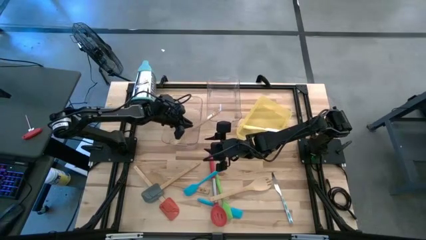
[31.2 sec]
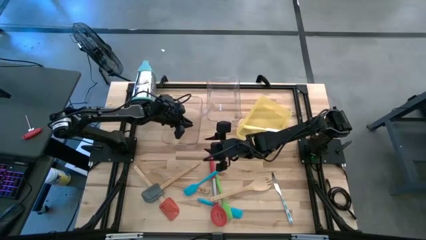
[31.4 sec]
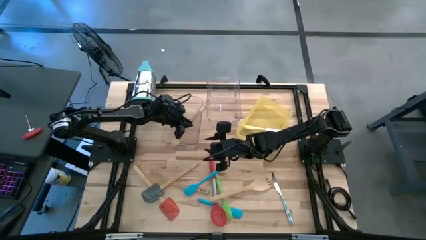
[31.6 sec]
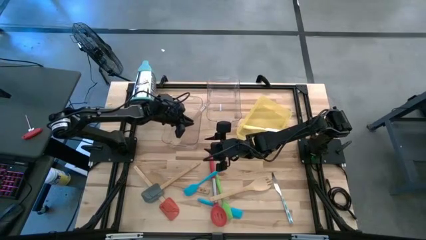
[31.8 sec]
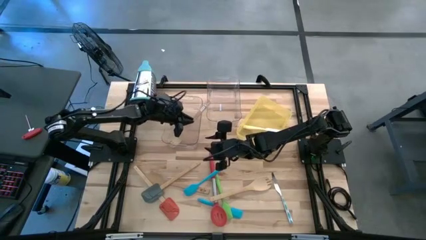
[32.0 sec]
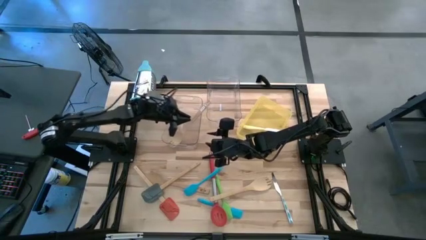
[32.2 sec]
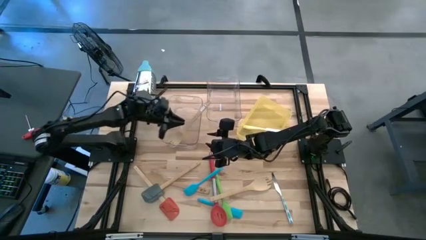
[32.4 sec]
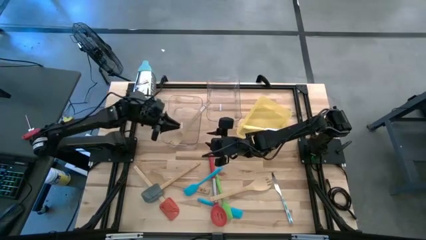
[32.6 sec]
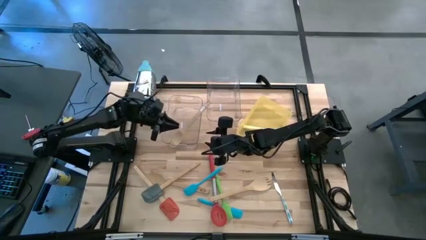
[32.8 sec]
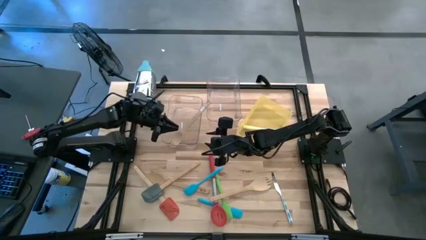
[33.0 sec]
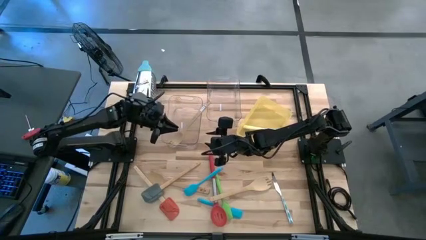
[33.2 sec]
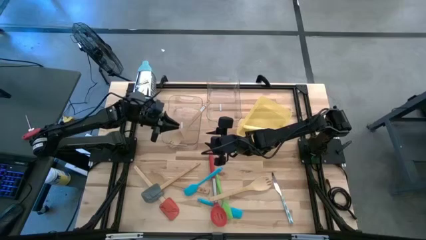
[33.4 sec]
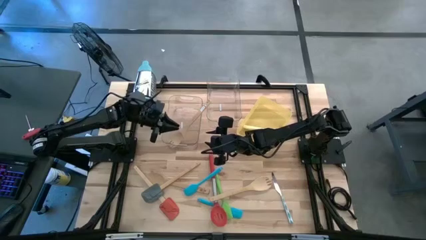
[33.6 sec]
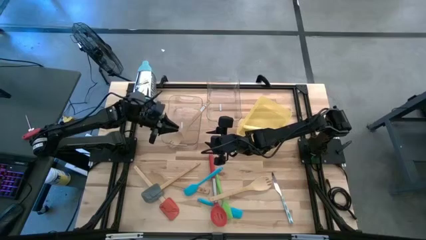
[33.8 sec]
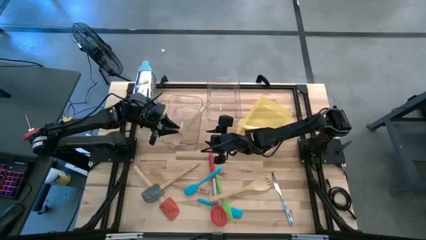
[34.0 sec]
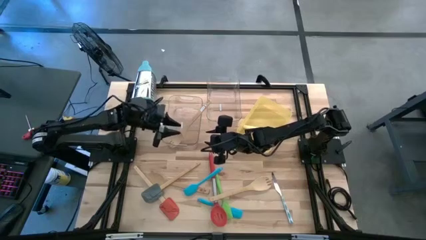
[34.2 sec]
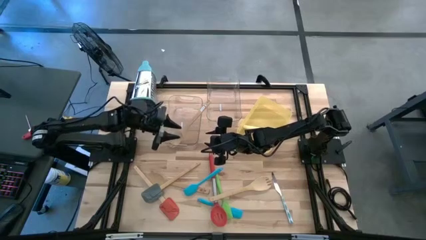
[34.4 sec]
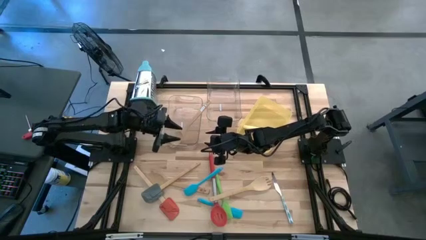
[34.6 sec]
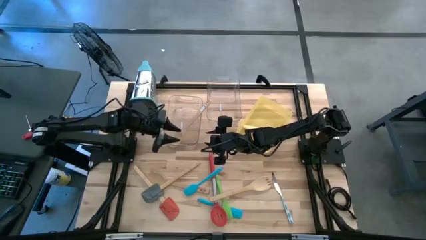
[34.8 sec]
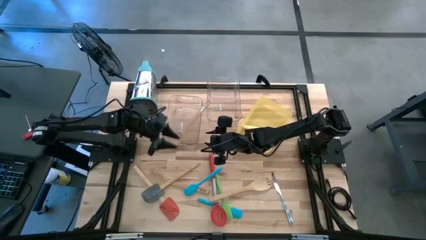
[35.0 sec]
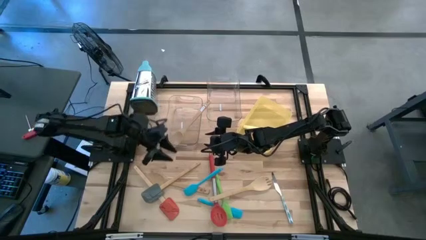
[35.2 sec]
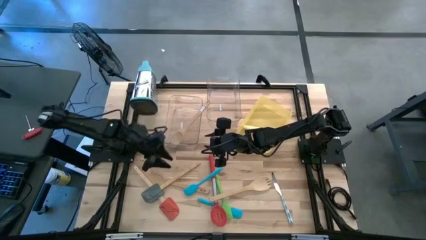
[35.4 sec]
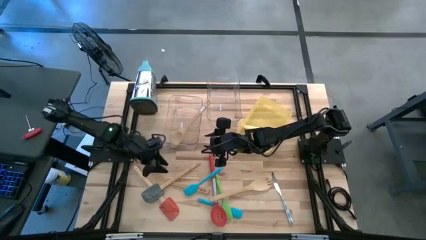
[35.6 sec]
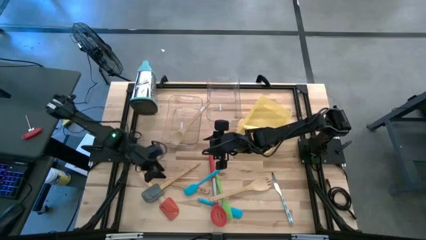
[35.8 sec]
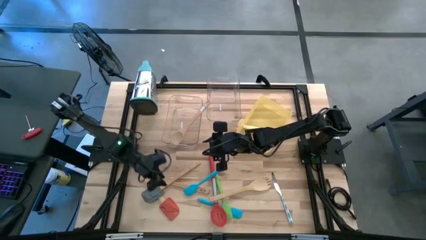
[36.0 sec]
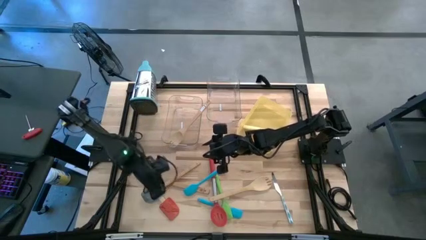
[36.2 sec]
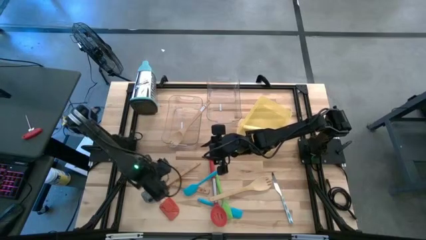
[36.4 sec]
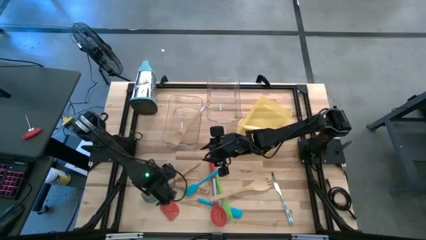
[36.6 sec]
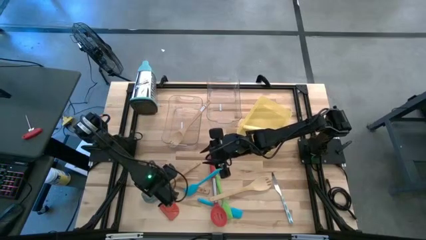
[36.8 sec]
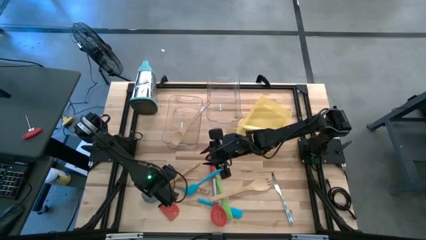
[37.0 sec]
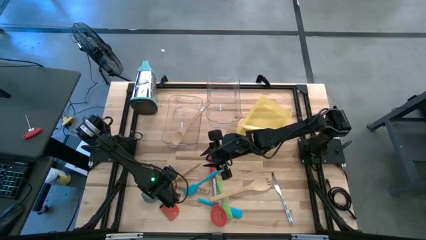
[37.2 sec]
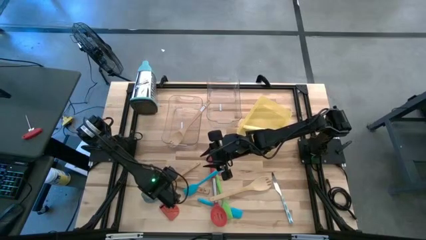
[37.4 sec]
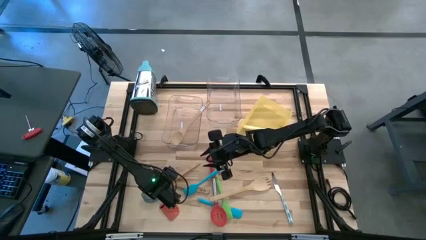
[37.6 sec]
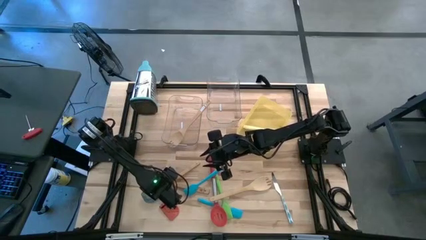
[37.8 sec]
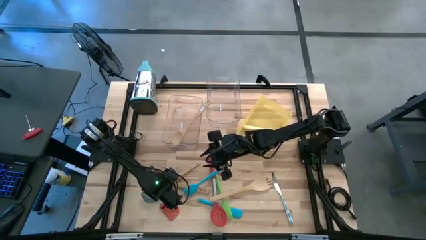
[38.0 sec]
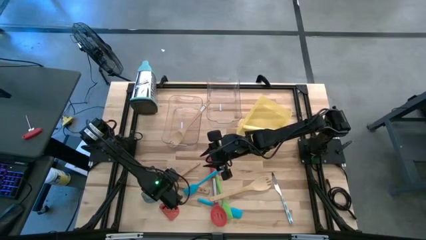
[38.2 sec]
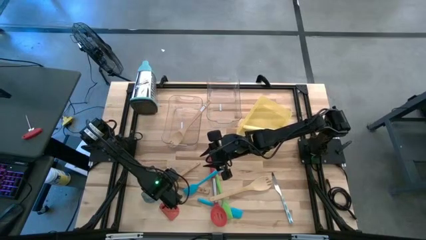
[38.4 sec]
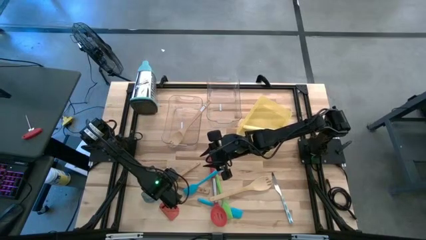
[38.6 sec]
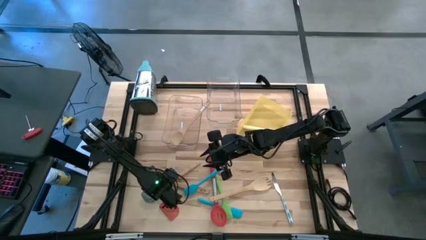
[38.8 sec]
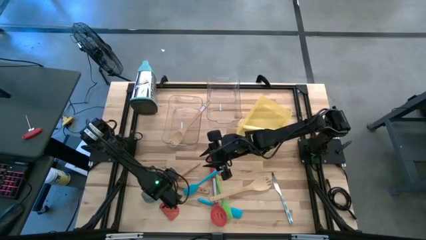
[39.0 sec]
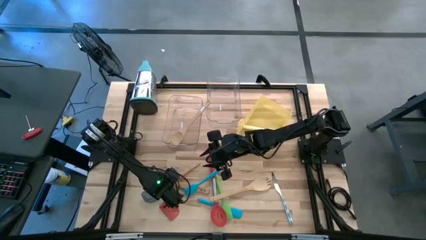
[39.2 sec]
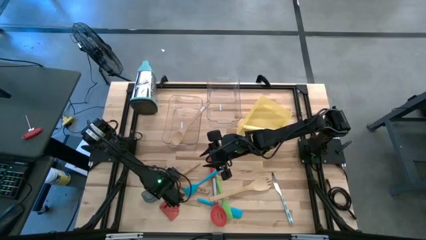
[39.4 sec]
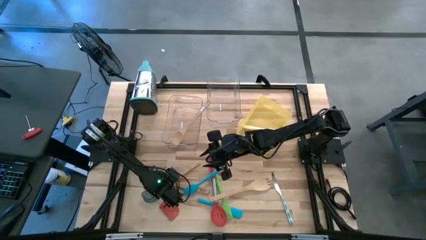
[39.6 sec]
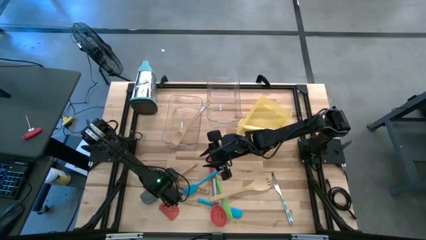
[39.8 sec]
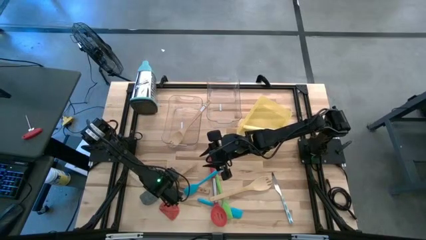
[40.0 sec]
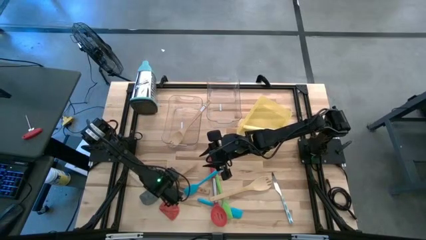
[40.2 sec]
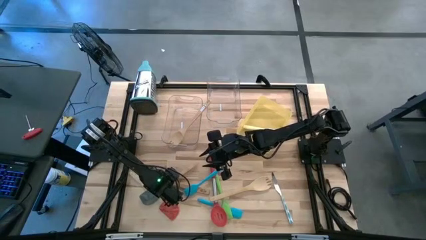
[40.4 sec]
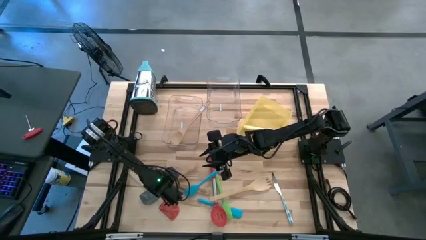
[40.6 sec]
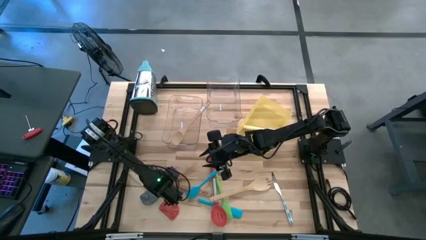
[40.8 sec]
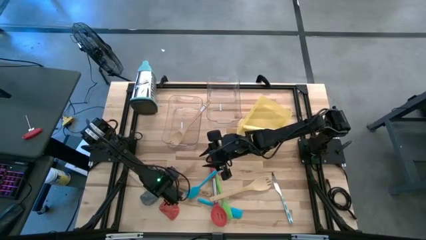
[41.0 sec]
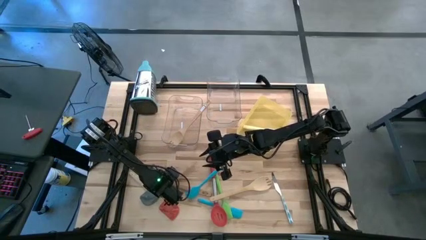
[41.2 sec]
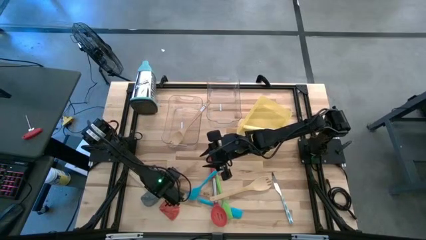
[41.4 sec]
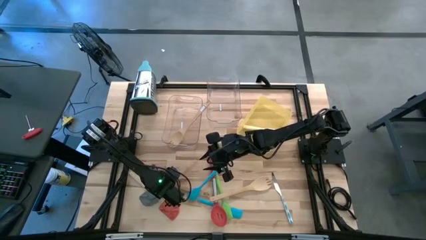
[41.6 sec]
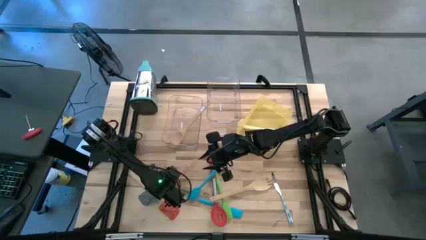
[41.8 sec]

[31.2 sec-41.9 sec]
Task: Pick & Place Kitchen Items
Put the gray spatula into the right transparent bin

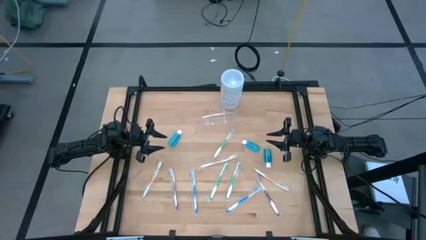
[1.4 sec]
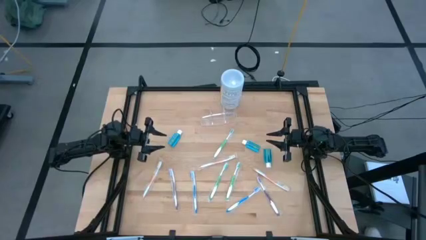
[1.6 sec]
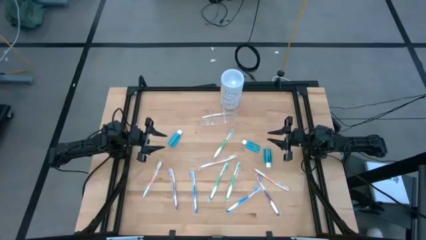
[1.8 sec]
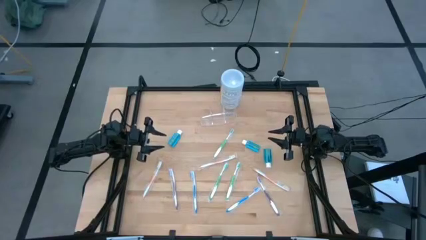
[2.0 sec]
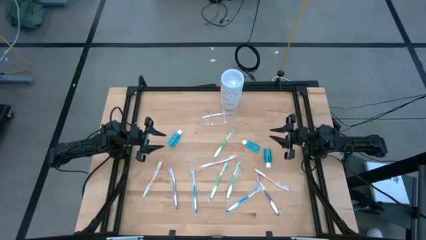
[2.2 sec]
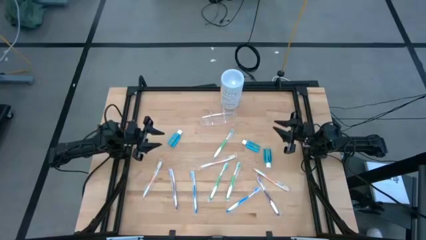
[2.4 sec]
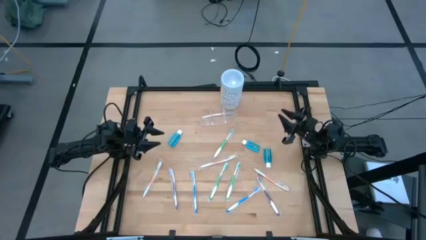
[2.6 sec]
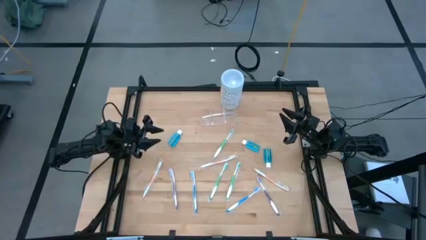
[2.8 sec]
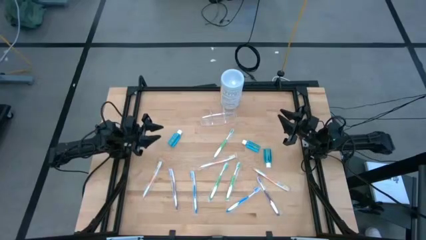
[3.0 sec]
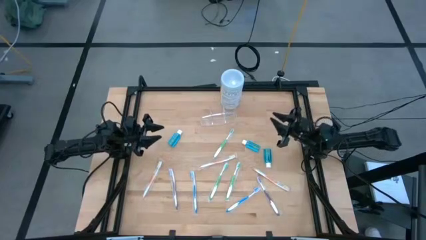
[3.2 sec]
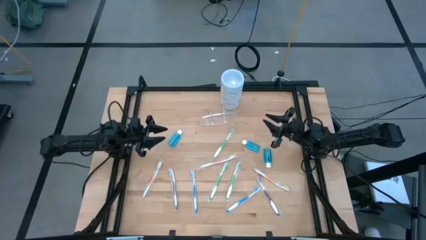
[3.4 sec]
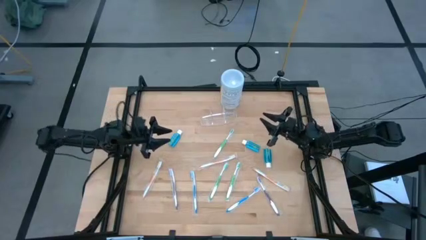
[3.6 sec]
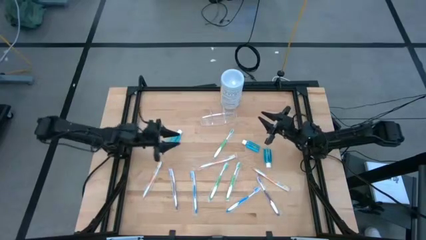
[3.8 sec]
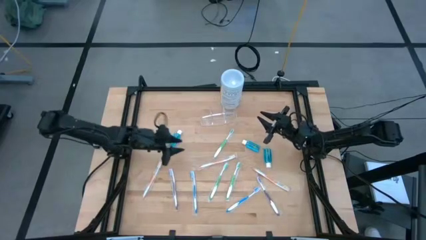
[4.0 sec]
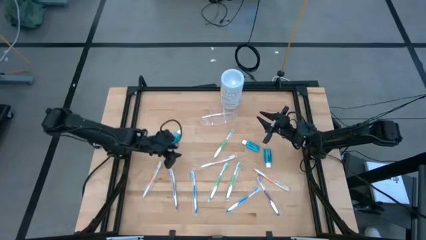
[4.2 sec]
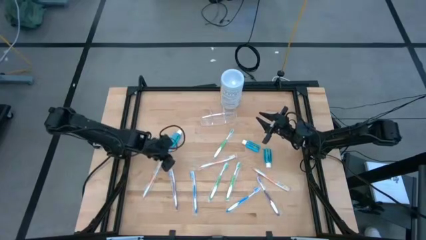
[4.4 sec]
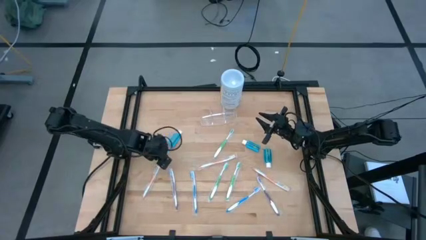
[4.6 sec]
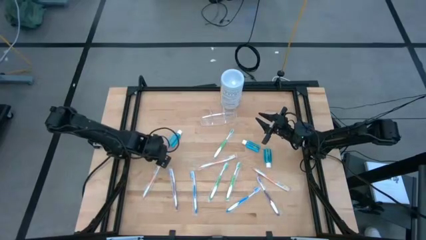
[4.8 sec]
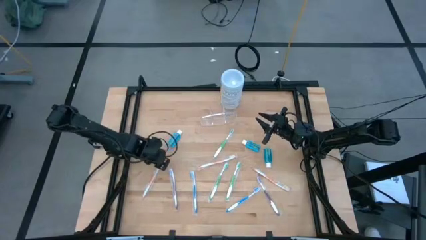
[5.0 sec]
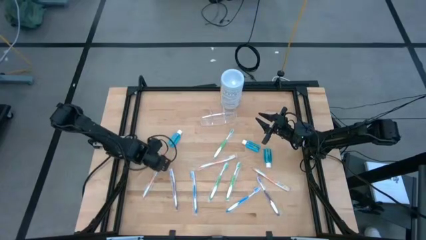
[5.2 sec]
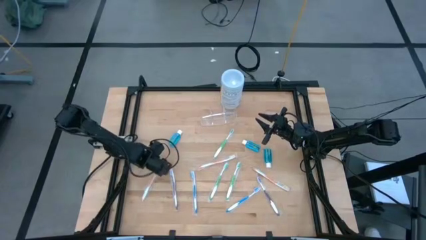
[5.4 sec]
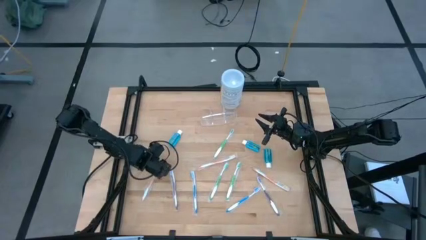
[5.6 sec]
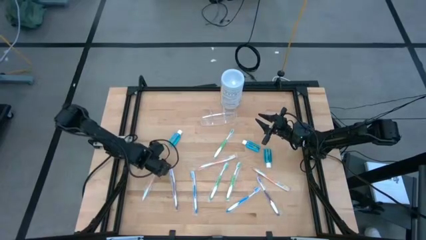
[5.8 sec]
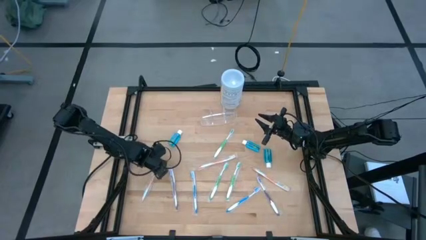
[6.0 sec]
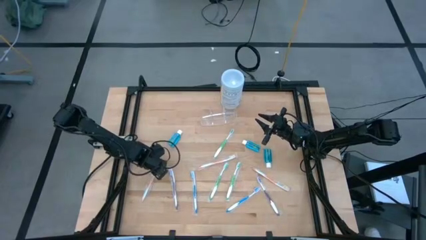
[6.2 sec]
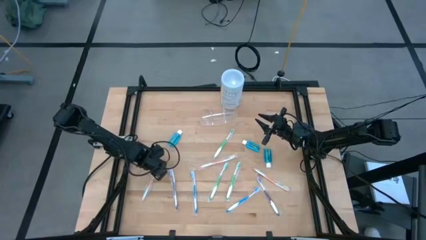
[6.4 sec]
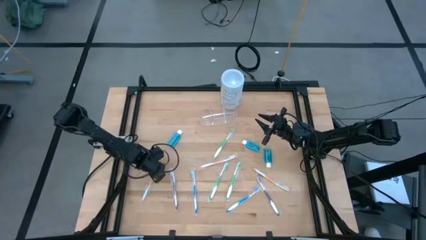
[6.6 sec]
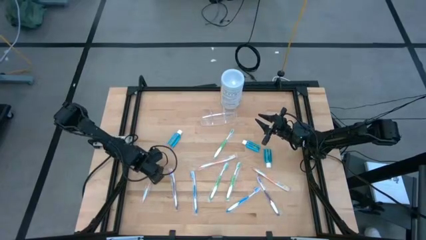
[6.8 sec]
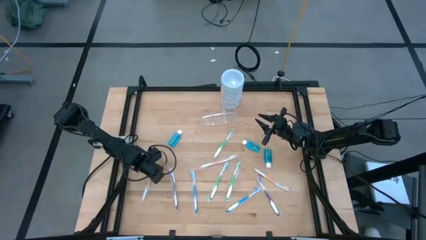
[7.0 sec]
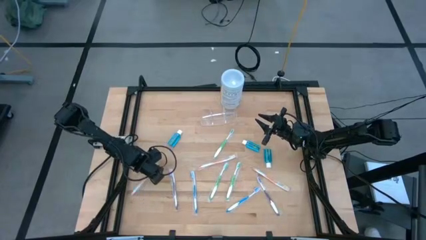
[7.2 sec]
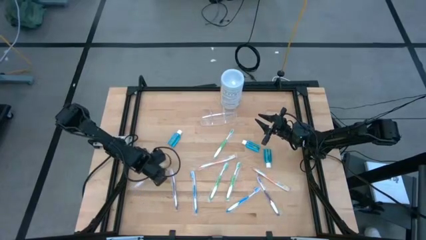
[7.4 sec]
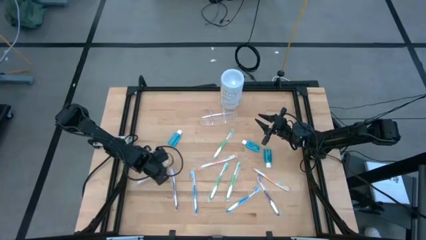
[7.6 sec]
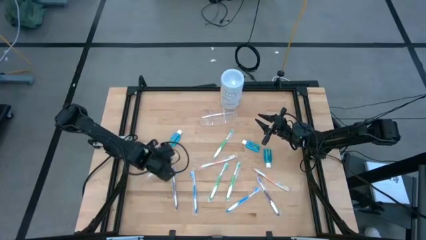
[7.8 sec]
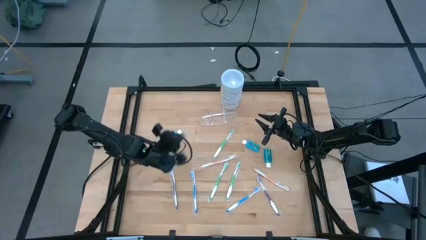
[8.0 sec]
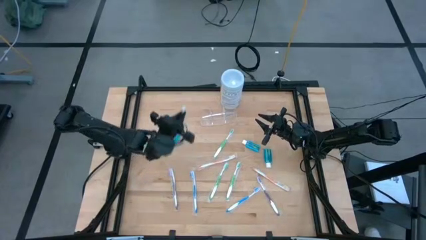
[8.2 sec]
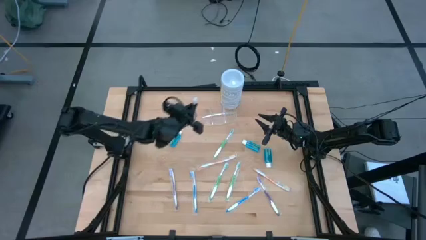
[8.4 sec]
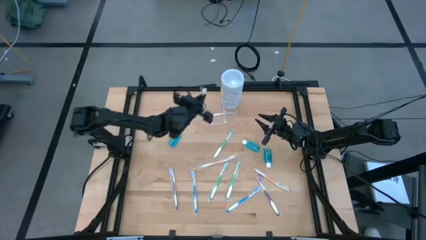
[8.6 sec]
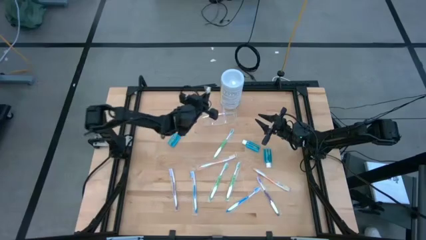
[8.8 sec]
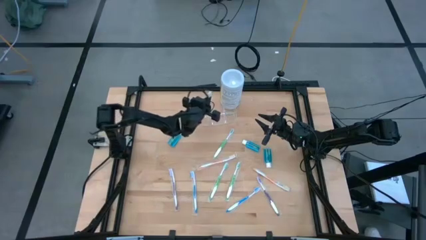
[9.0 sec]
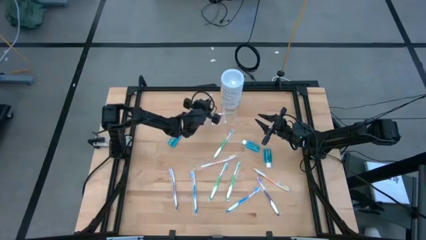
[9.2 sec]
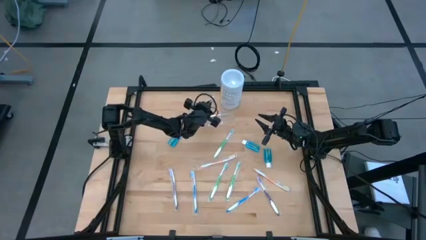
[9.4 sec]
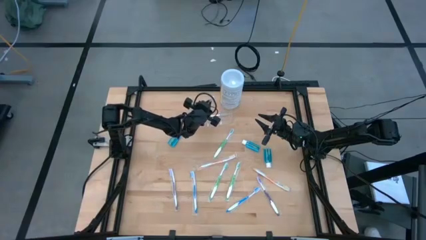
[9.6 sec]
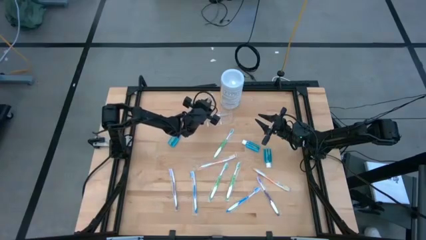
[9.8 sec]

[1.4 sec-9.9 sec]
Task: Pick & Place toothbrushing station
Put the bottom left orange toothbrush into the transparent organizer
